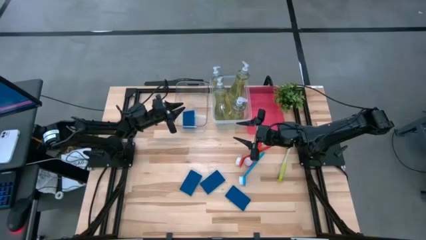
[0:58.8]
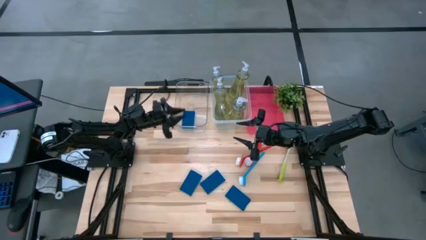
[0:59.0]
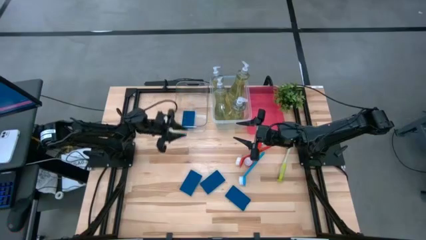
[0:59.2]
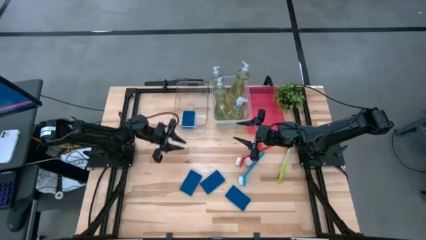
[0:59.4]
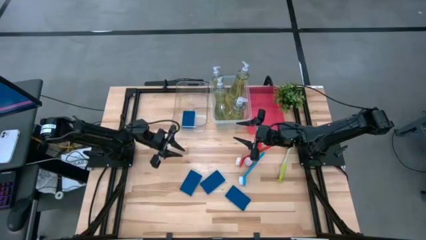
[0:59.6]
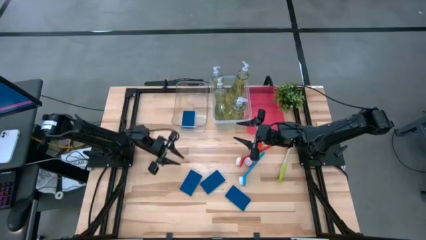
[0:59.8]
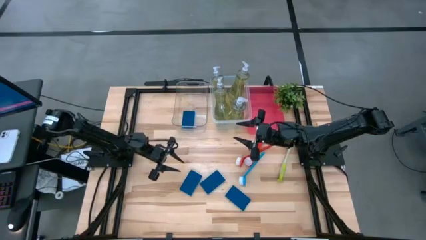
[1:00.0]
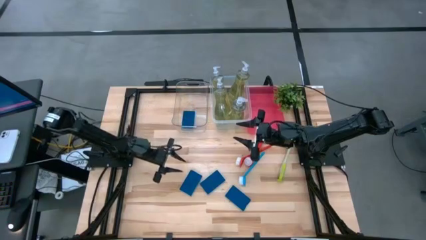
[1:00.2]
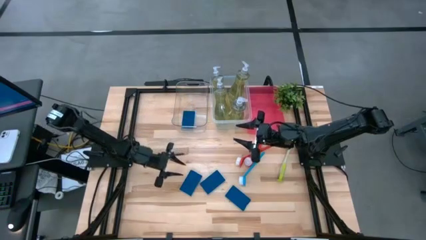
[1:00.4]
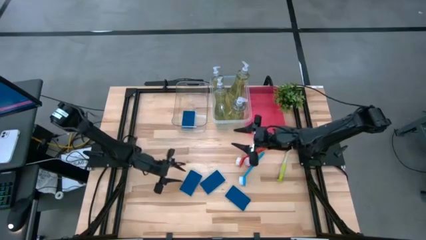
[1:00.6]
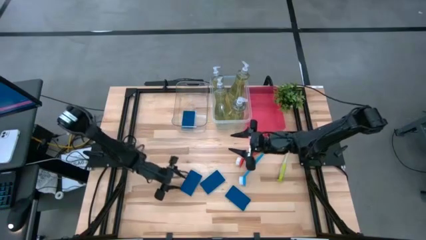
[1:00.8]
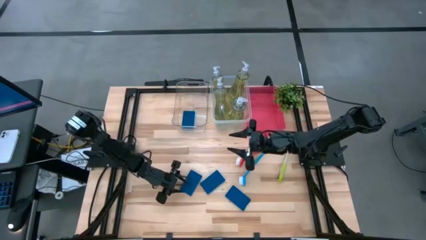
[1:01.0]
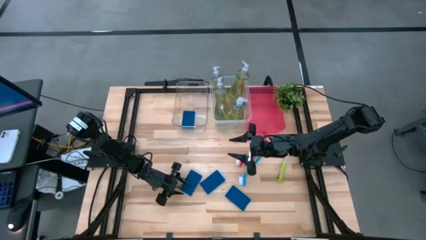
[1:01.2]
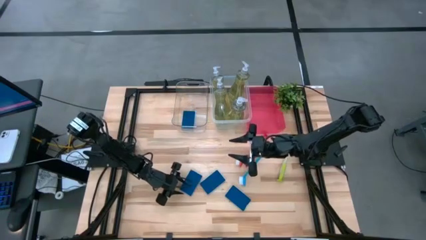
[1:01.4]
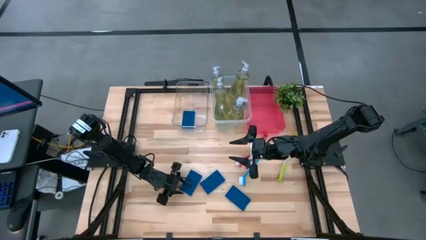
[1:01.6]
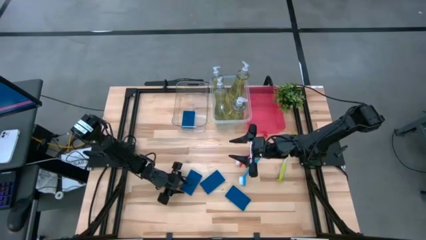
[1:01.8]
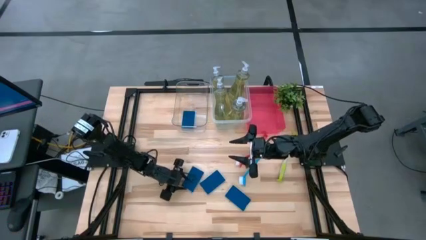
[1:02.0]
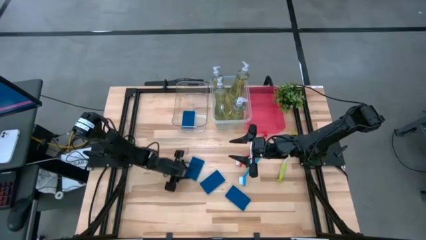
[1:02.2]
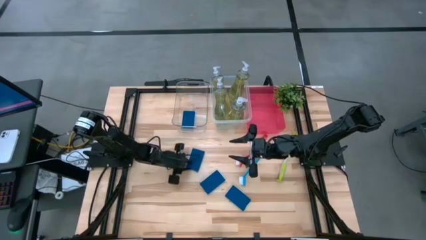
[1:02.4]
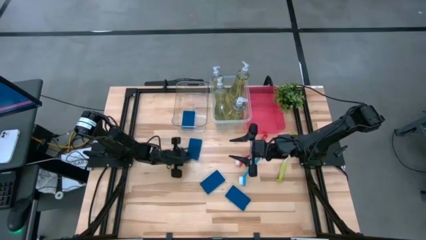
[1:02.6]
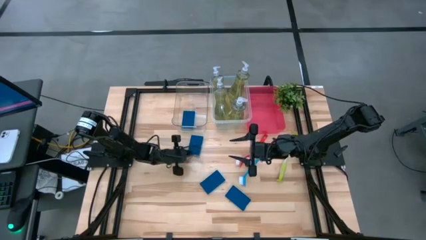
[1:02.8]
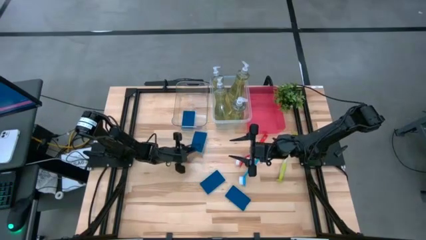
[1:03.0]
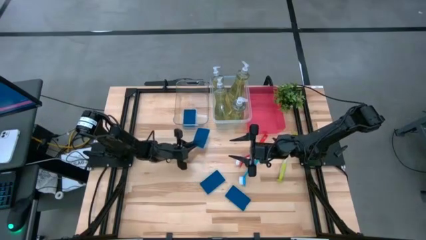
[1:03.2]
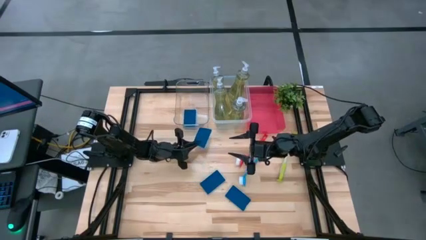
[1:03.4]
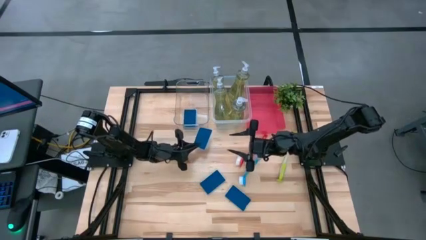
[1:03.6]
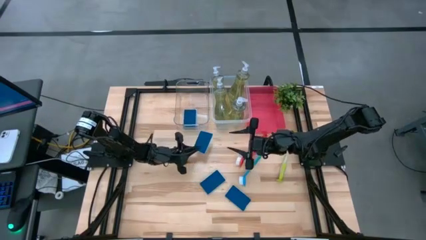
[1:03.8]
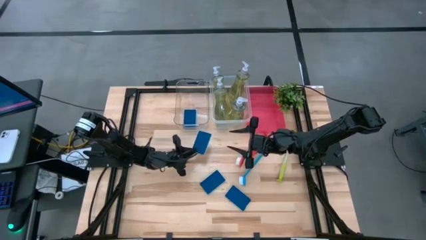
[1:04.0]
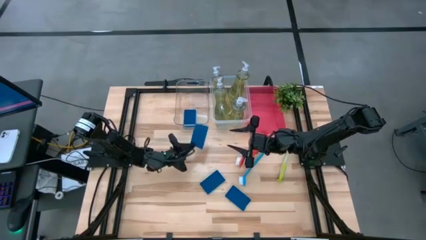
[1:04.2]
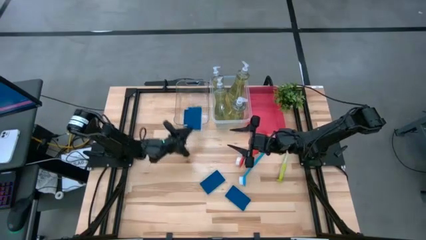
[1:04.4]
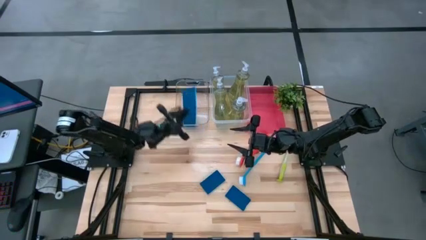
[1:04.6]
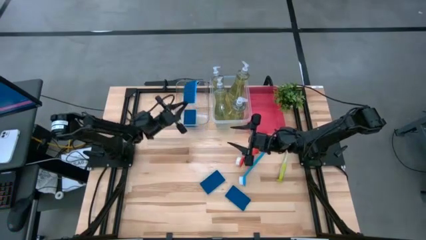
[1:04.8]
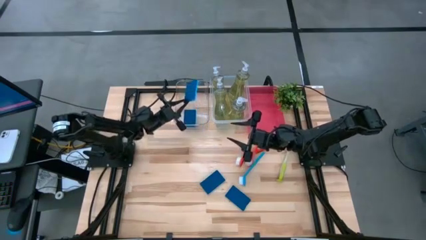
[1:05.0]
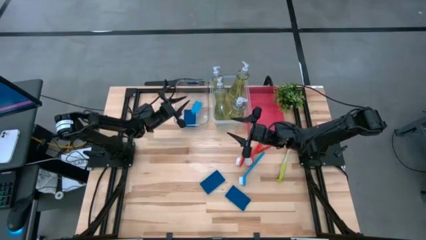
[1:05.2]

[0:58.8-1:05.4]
Task: Pick & Place Kitchen Sink Supplies
Put the blue sponge into the left transparent bin

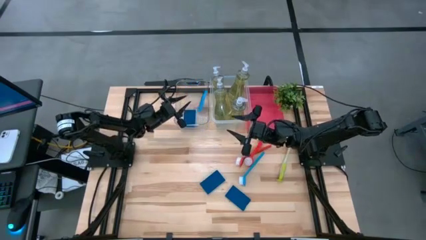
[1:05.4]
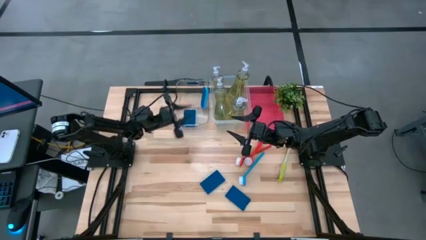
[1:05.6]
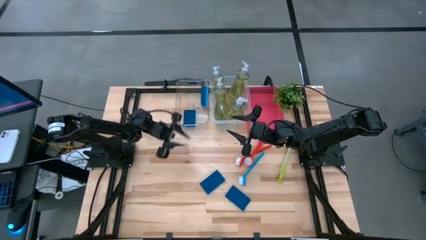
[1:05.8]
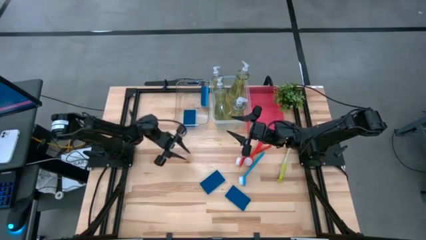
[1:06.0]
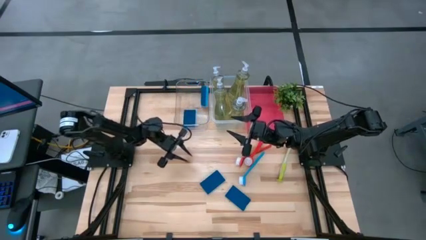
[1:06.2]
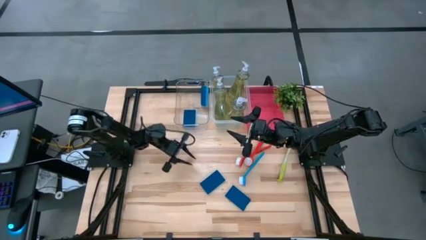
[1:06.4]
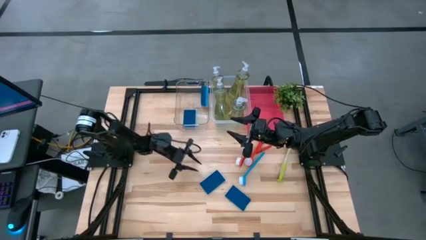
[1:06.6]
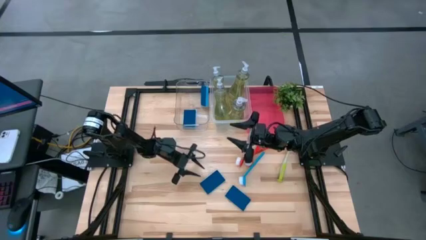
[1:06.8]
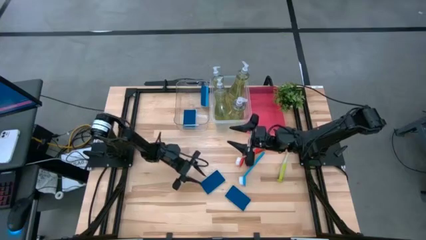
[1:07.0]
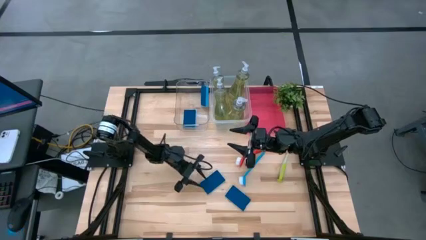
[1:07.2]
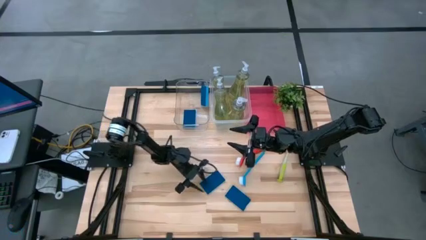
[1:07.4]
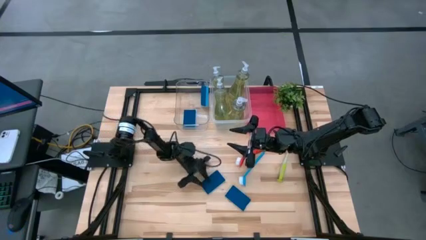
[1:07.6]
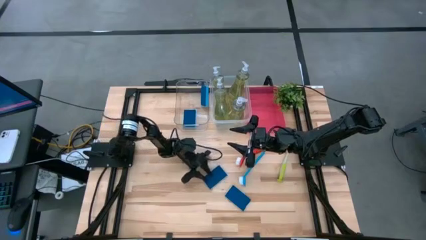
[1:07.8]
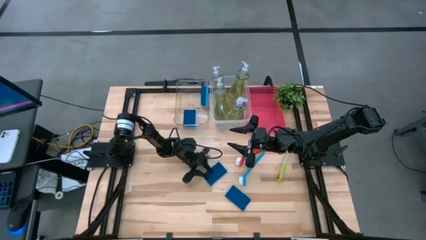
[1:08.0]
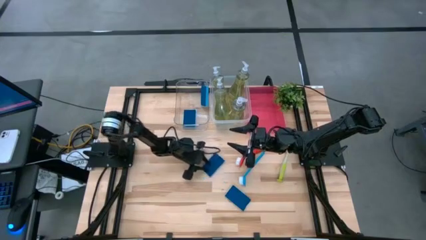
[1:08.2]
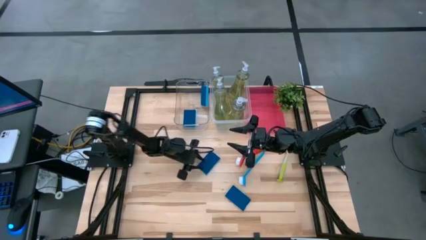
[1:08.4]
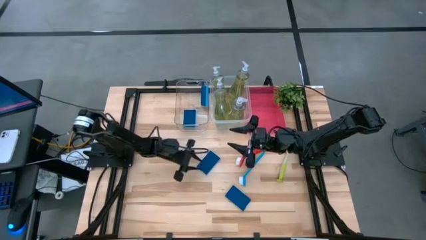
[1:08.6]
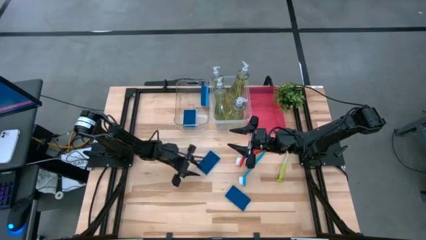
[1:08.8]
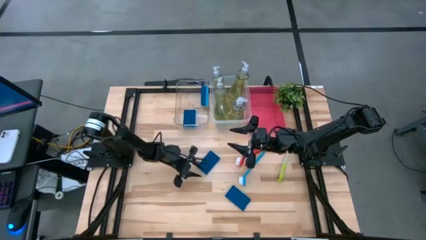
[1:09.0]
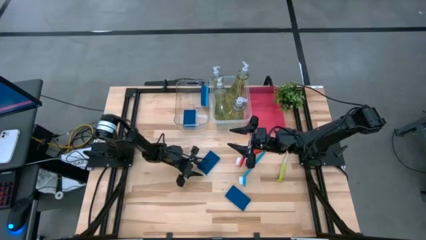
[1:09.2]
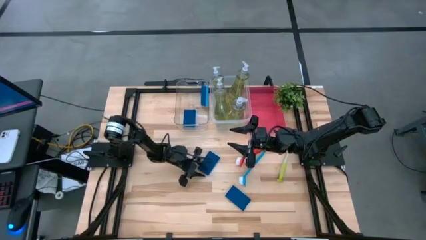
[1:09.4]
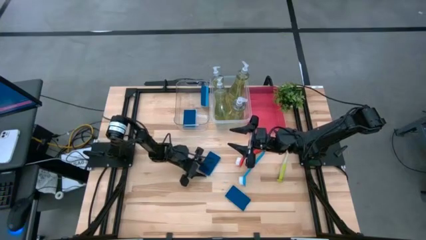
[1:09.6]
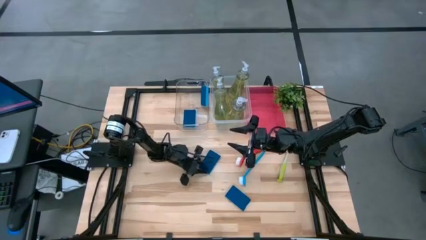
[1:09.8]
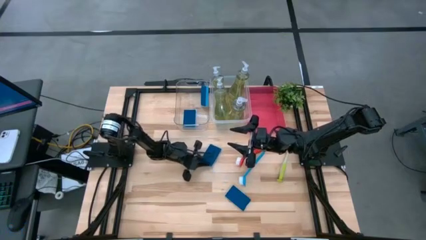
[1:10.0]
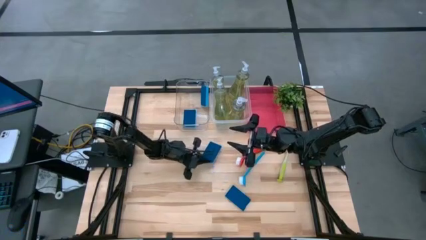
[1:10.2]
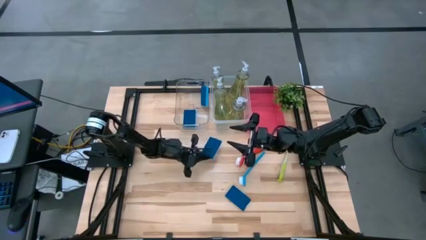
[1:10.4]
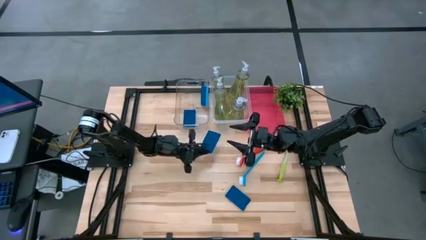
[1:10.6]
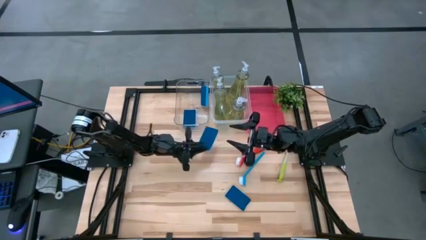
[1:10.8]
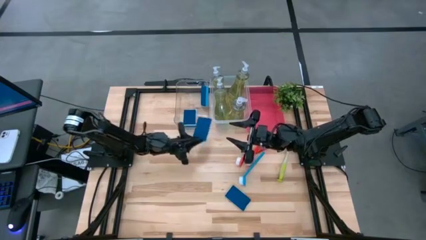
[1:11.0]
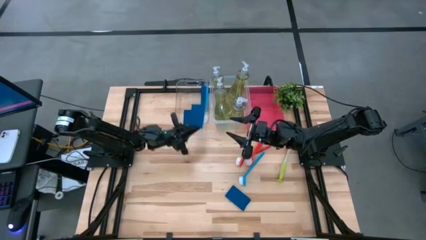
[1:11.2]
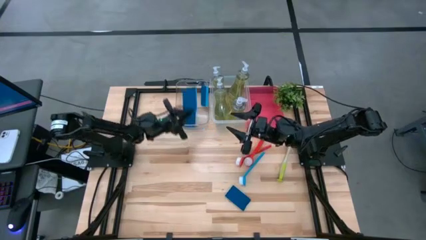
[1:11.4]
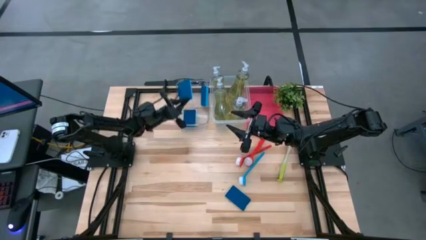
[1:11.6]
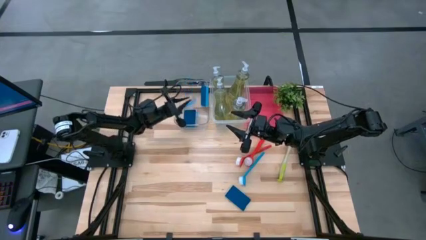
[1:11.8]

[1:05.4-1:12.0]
Put the blue sponge into the left transparent bin
